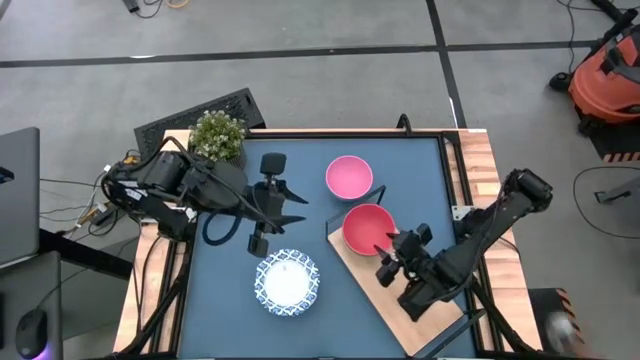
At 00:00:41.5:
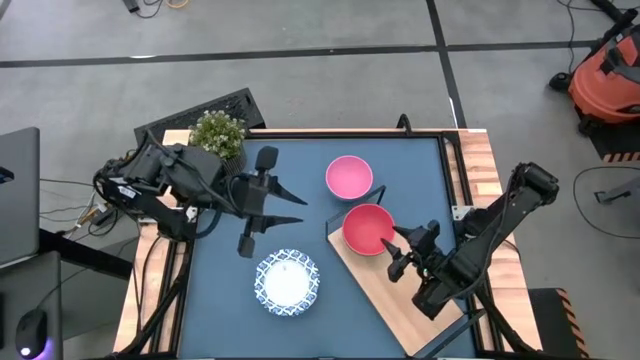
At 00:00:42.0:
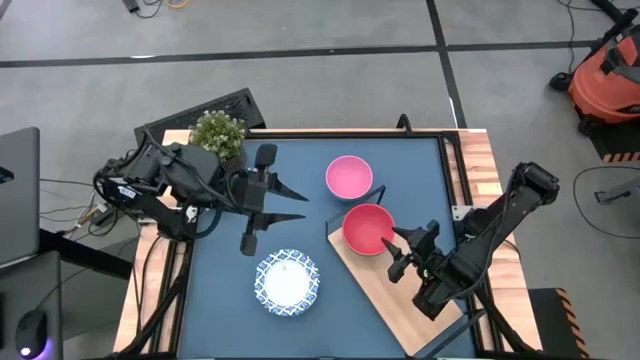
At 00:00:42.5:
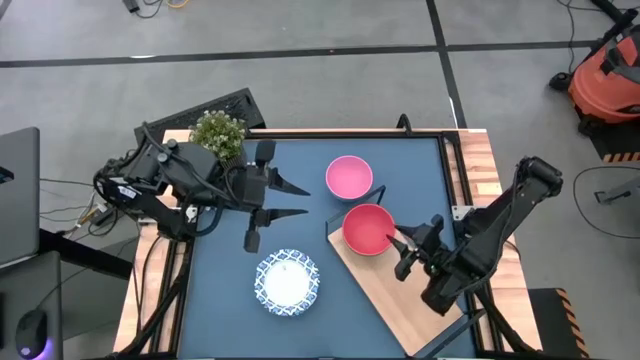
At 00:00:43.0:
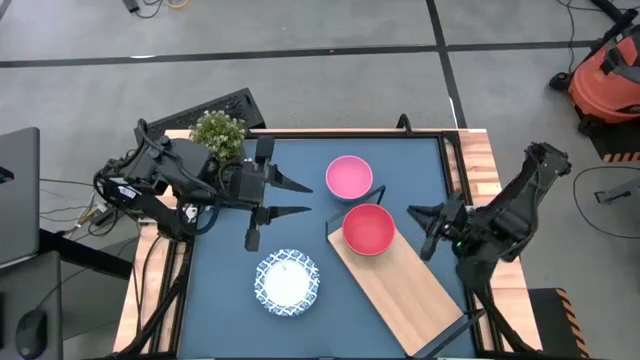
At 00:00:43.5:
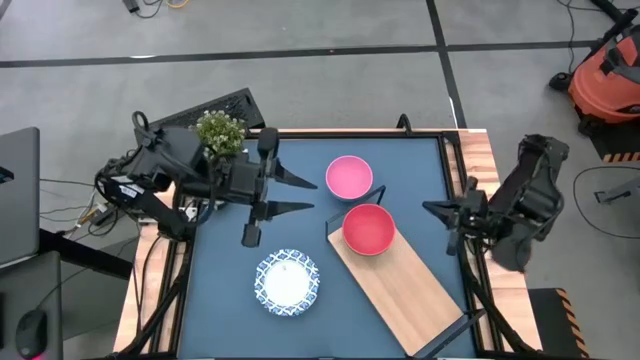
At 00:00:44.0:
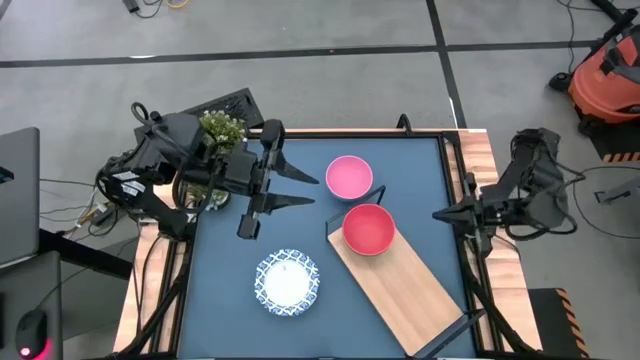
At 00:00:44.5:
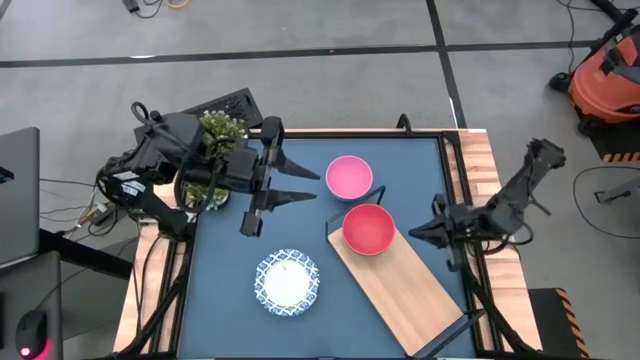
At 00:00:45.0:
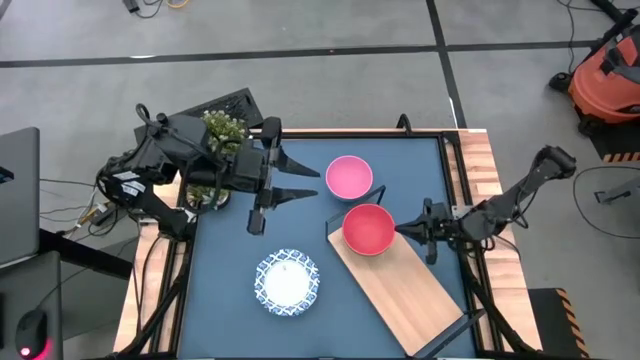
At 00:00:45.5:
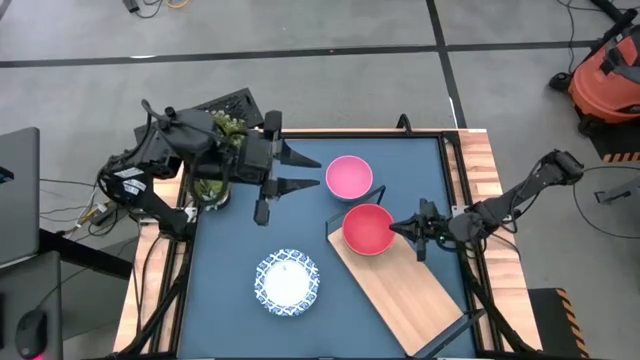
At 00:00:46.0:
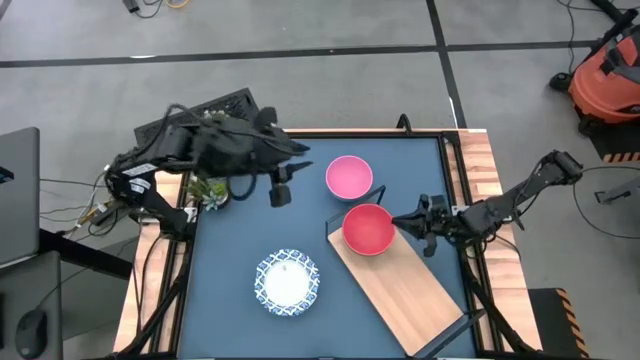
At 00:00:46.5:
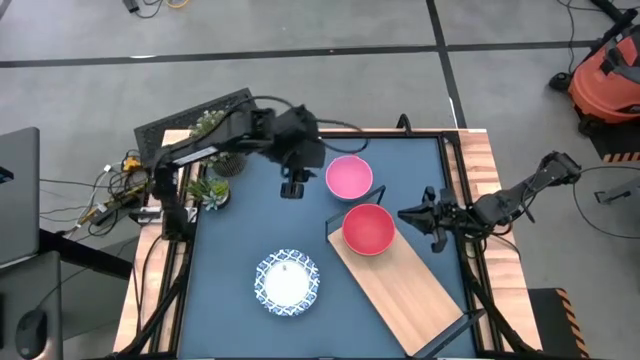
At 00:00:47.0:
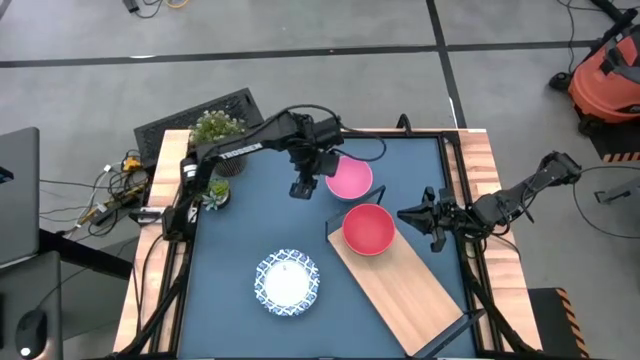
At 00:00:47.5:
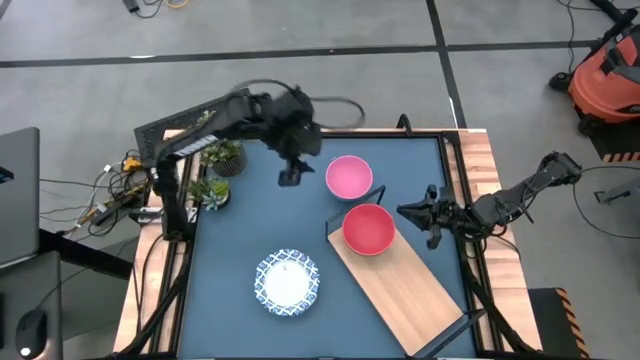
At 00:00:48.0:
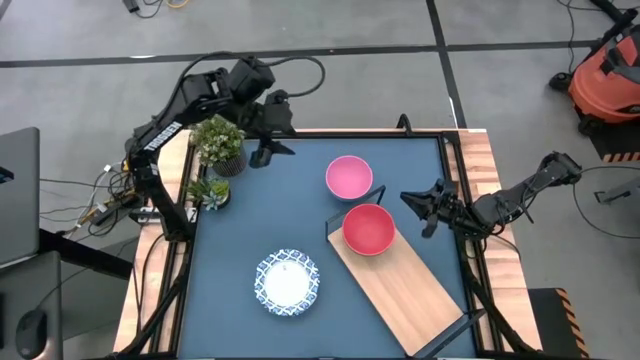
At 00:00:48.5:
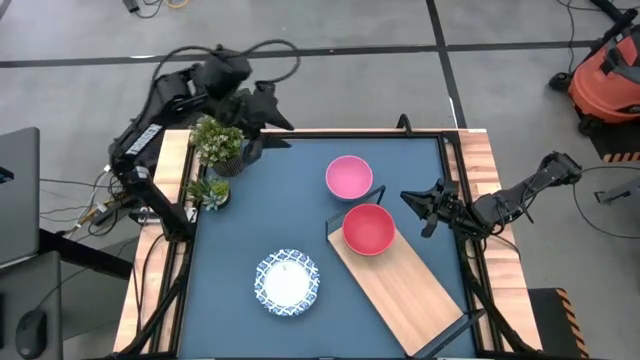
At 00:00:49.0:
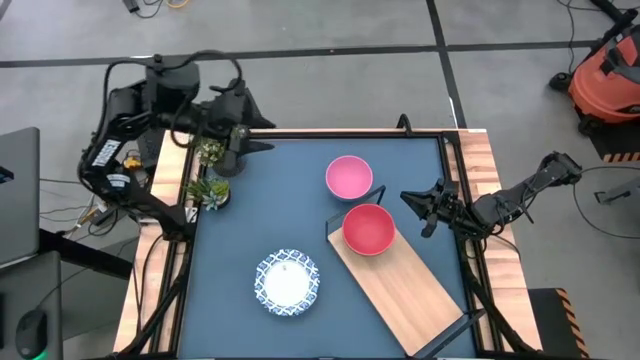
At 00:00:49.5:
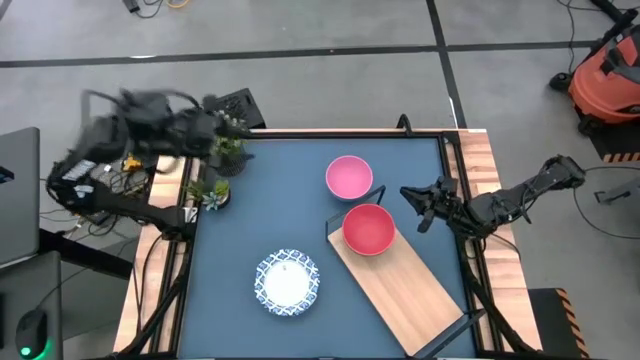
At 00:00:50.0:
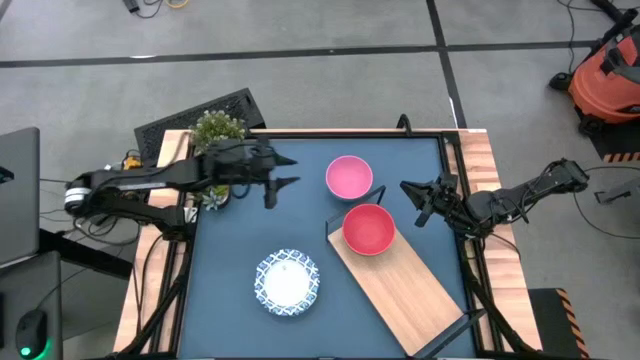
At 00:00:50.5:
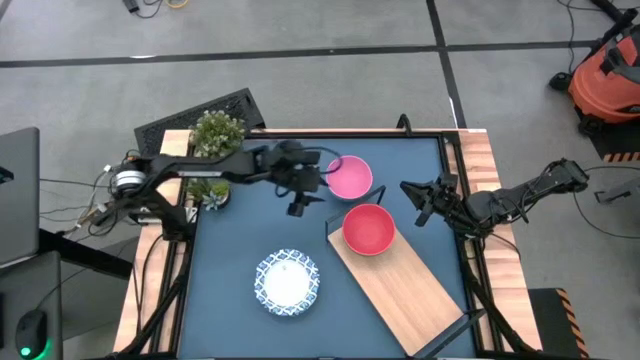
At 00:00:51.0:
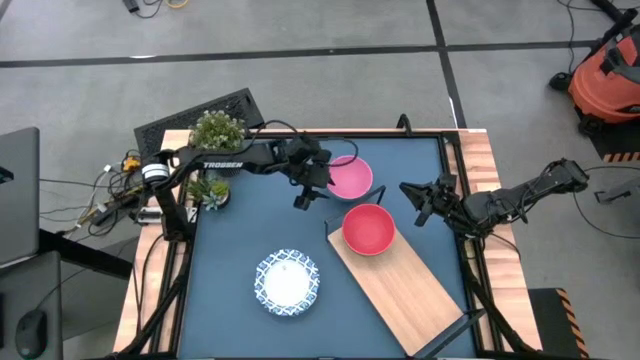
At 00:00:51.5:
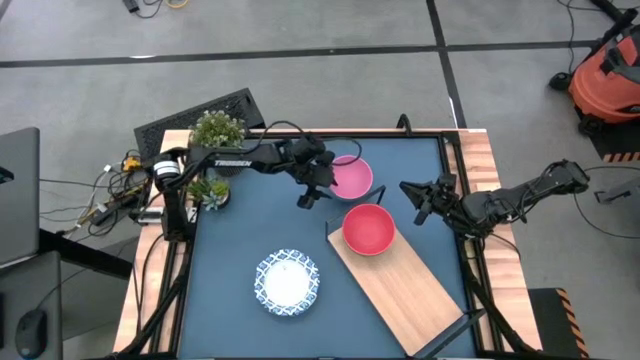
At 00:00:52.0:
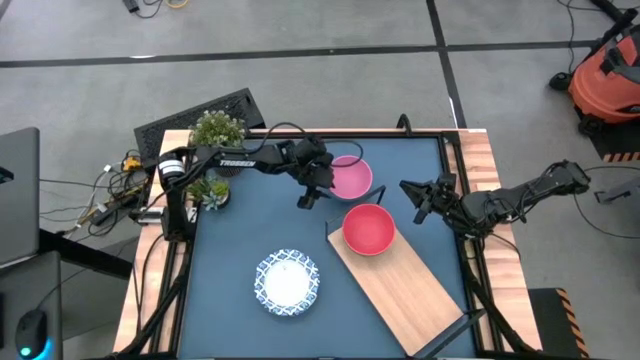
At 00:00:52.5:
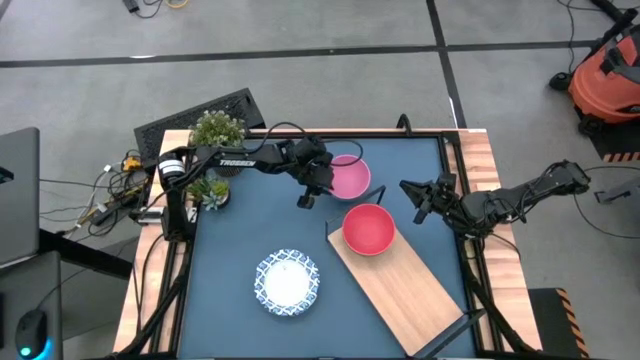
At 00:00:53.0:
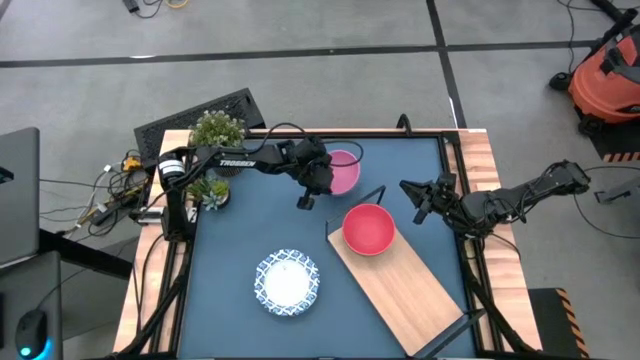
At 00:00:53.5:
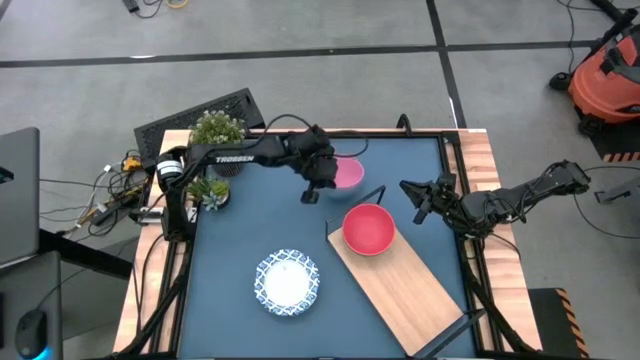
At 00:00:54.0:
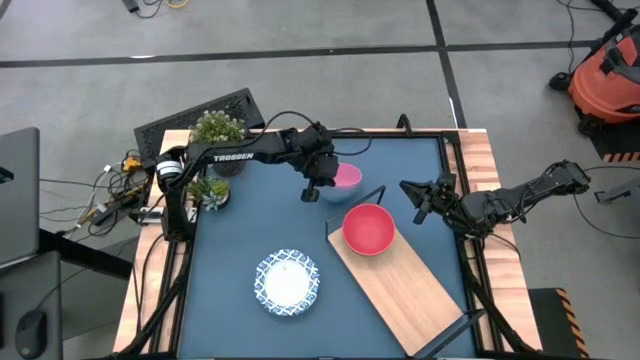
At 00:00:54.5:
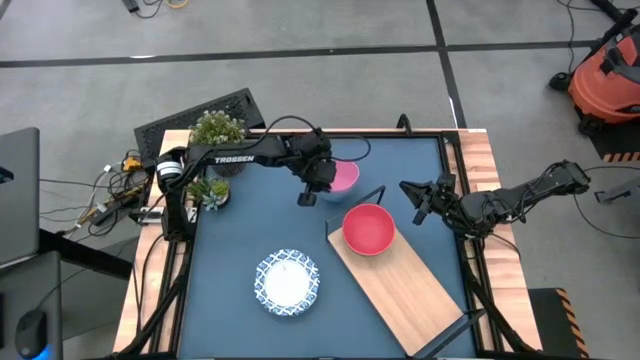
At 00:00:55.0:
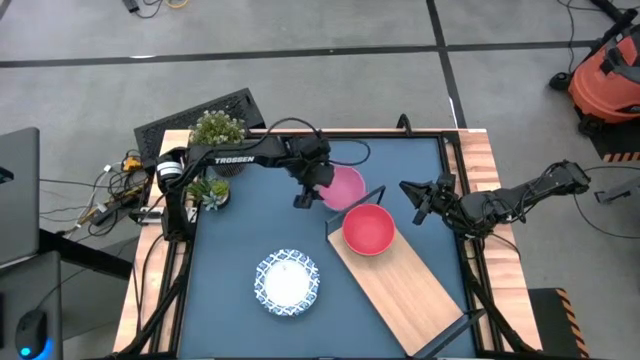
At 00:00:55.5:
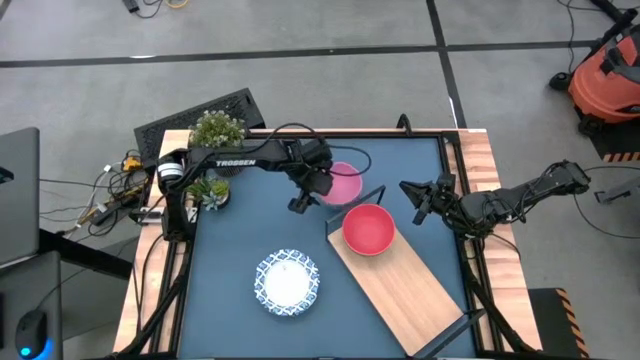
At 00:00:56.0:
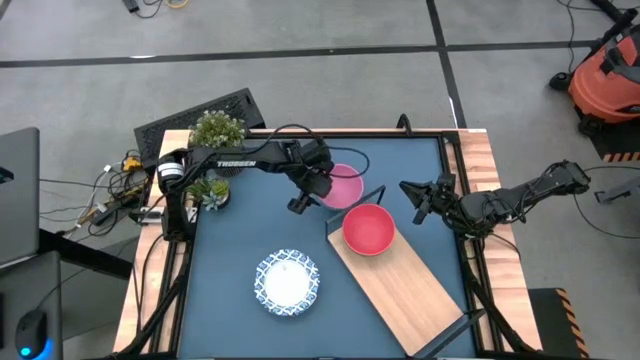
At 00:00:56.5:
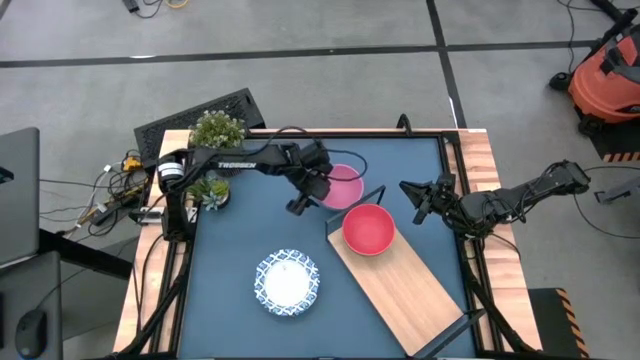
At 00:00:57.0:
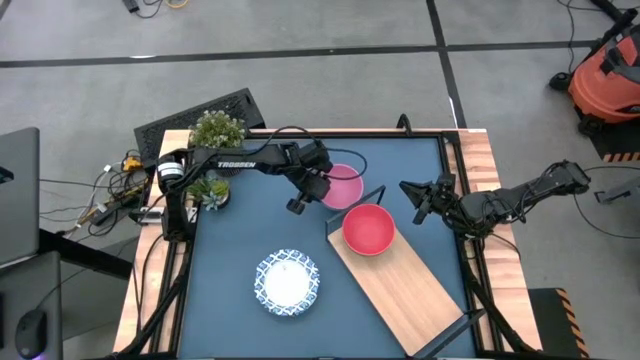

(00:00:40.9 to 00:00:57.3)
Task: Place and stack bowls onto a shelf
Stack the pink bowl on top of the orange bowl on the shelf

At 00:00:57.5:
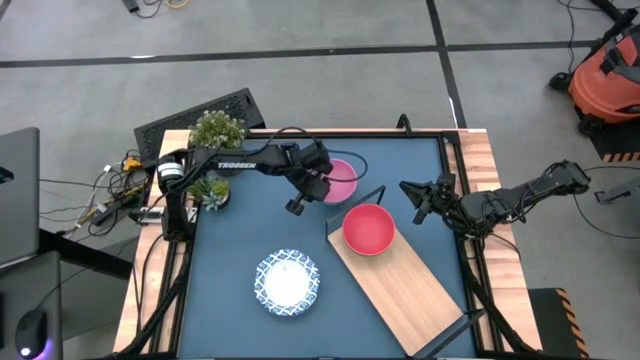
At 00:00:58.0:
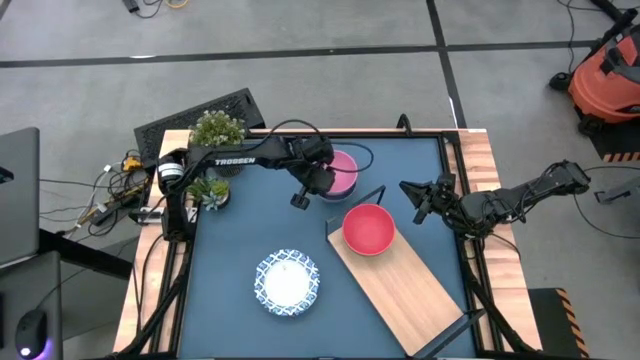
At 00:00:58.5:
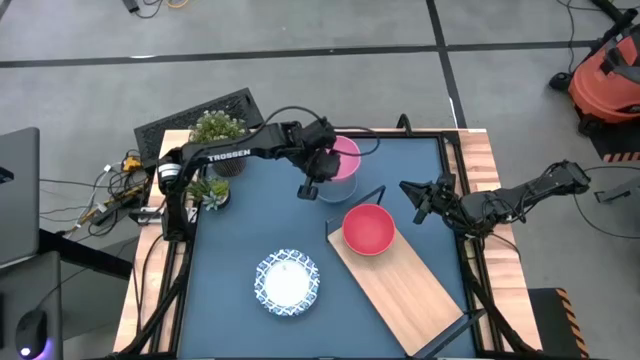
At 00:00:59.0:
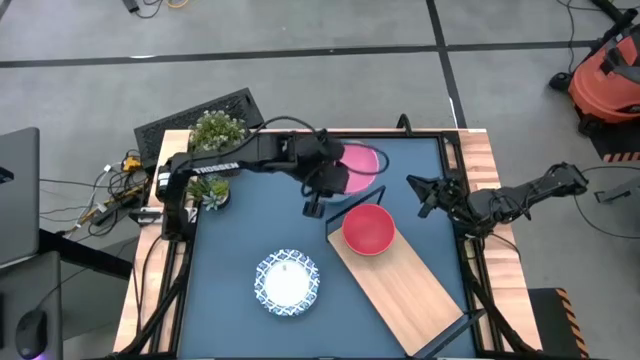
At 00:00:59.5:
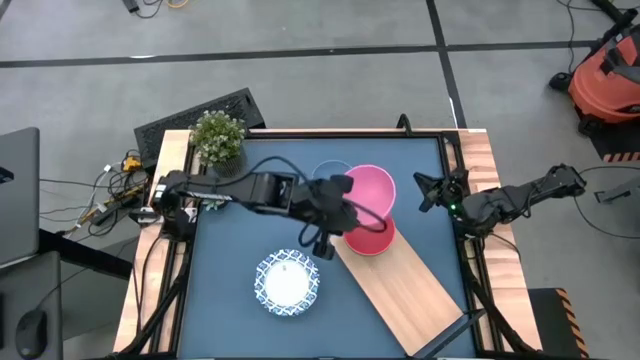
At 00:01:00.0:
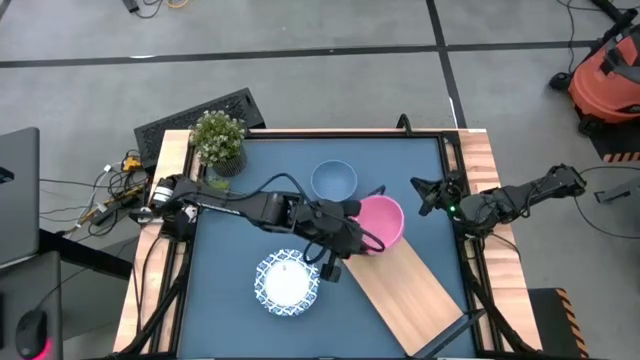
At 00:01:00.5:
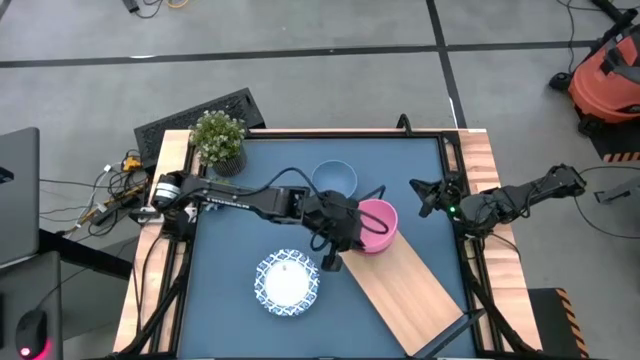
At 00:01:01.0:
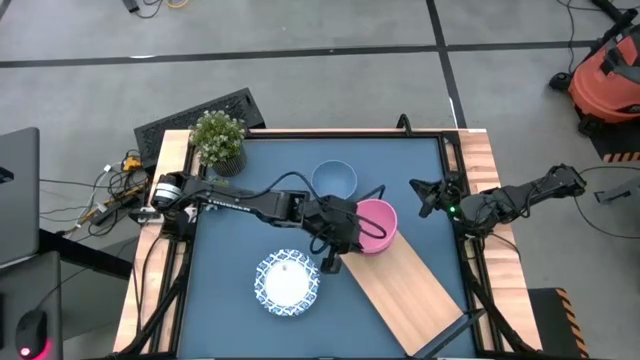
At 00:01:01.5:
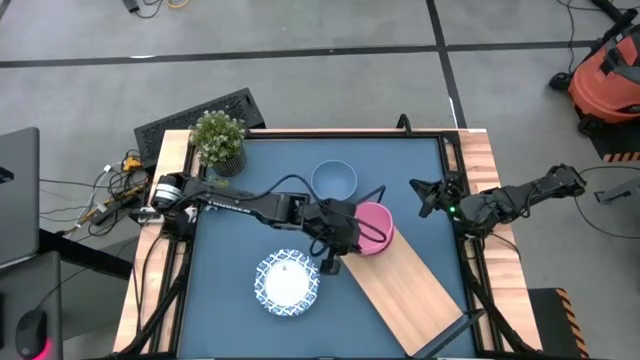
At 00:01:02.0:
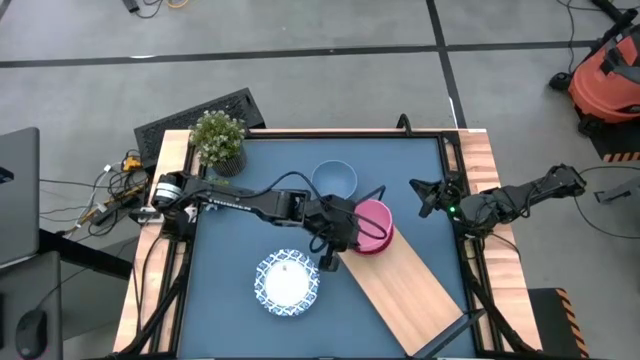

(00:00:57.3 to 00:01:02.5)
Stack the pink bowl on top of the orange bowl on the shelf
